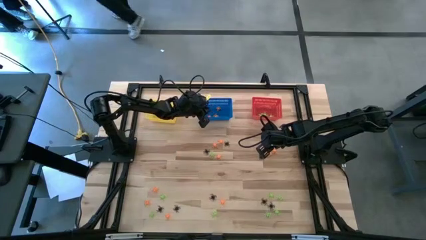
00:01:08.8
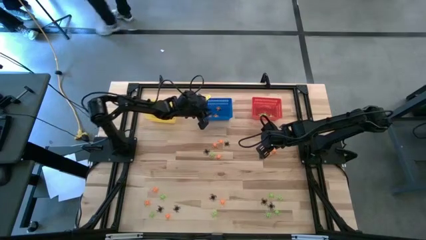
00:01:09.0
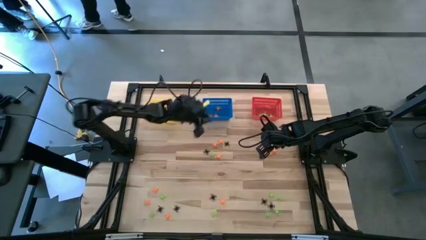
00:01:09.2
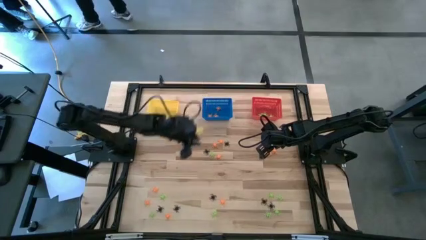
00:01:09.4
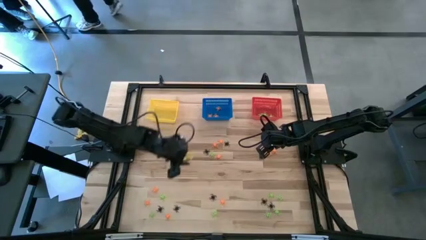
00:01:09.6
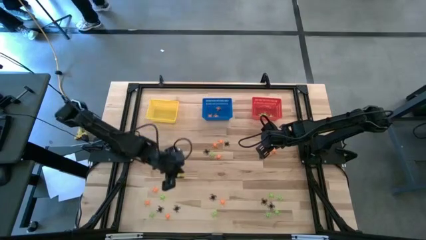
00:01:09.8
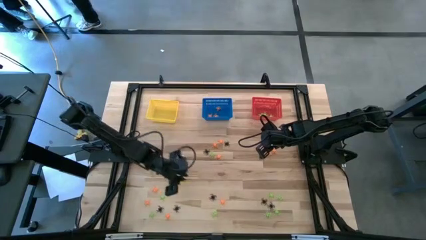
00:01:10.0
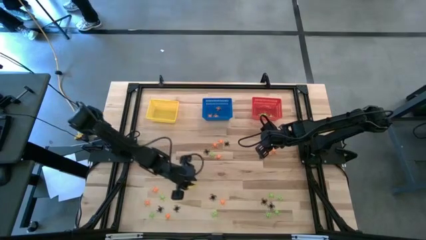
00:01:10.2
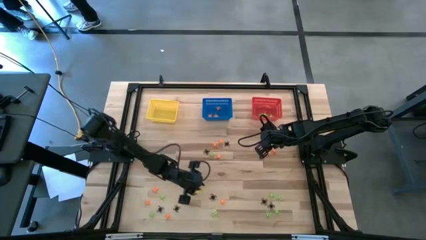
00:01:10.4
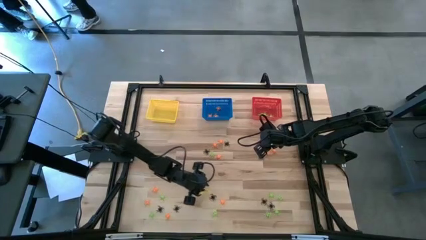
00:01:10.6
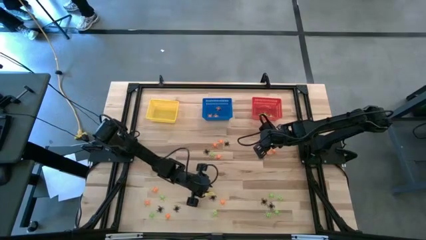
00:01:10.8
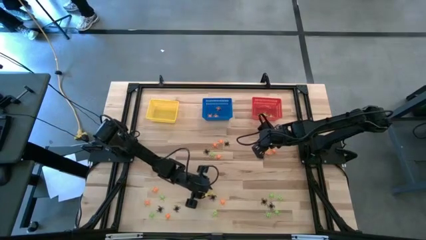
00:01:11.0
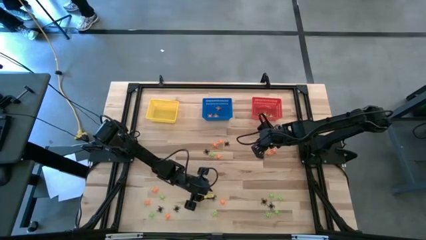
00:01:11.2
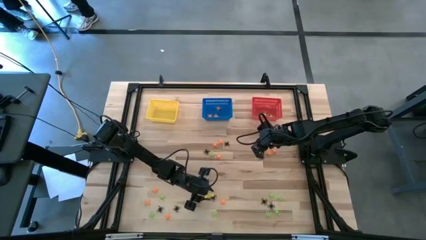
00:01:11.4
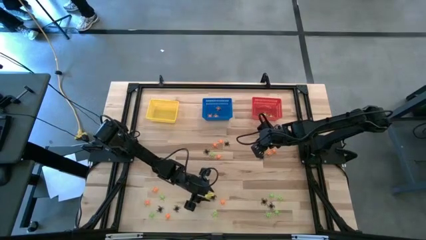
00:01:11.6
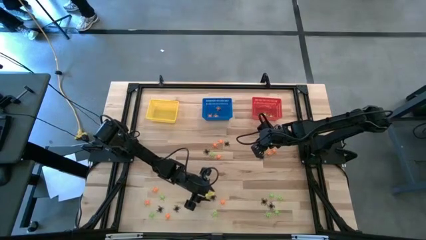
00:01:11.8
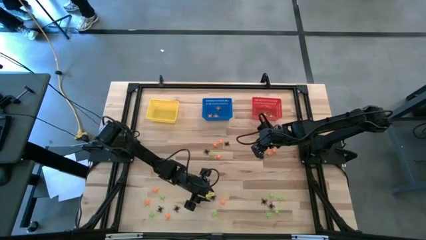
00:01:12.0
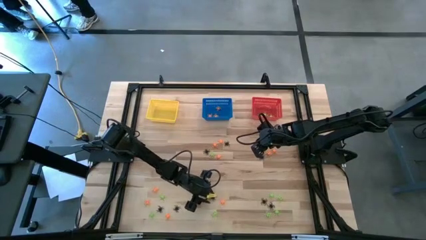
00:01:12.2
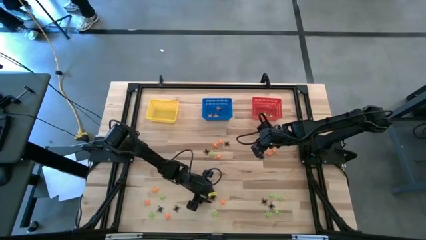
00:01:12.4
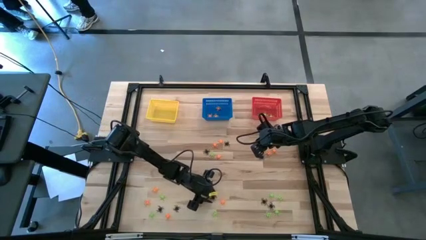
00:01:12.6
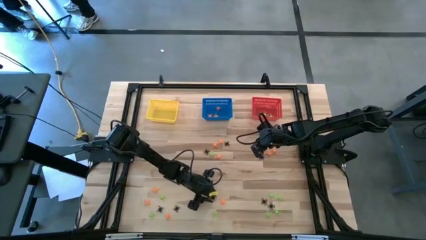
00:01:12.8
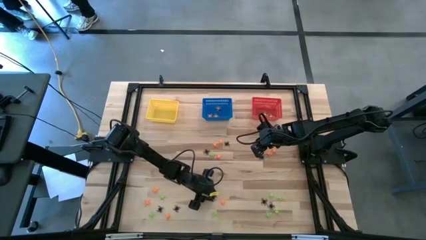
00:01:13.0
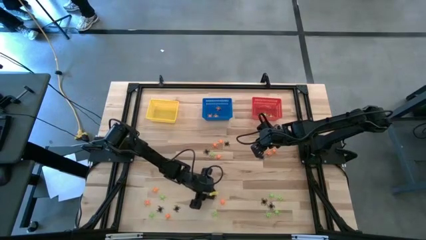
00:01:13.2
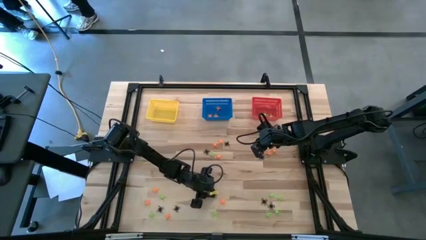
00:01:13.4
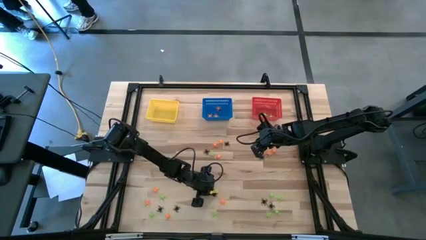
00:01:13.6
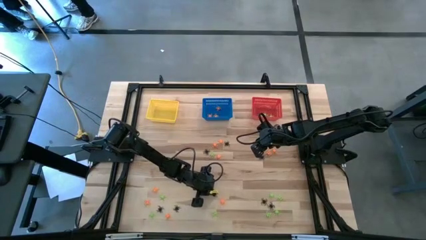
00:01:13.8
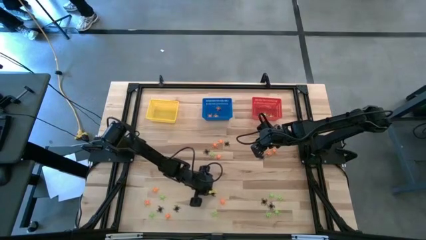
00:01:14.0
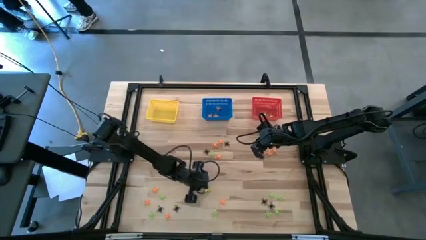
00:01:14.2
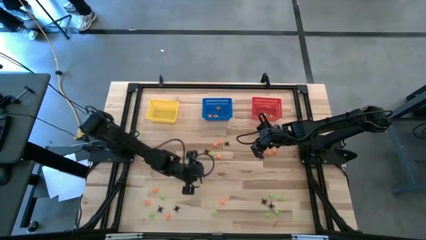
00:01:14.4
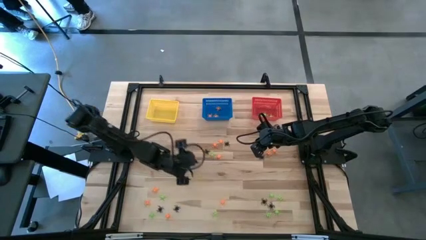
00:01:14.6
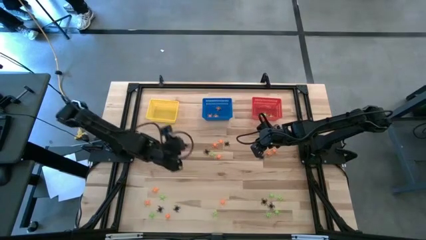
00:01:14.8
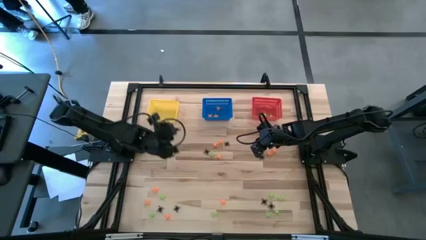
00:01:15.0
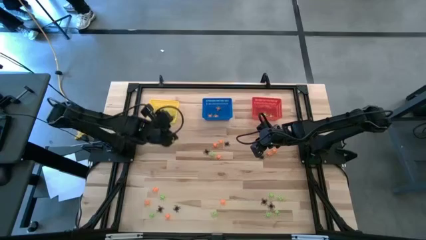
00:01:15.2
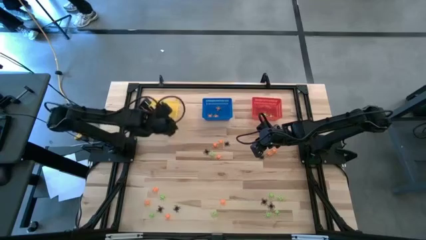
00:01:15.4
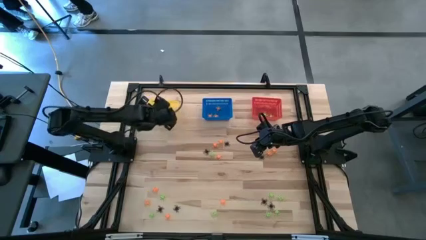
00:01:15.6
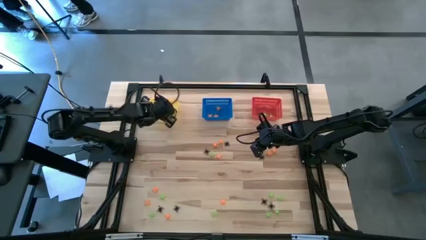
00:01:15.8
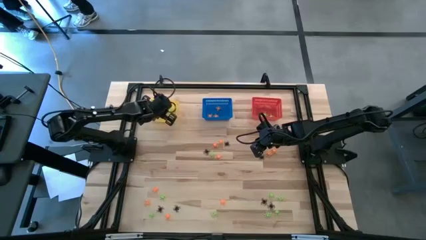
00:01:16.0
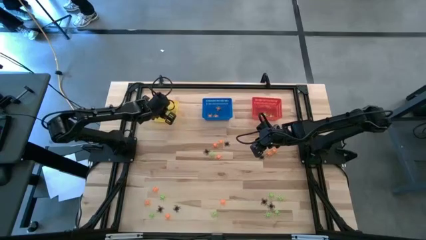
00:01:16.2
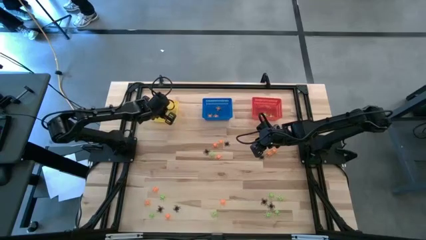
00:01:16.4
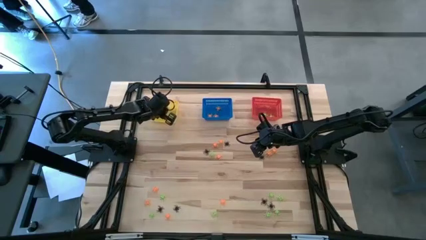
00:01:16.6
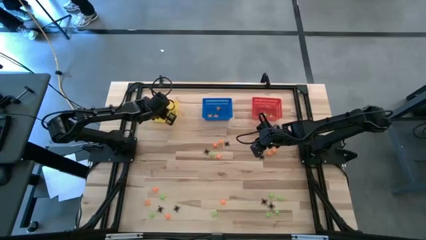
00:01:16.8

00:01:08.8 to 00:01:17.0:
Task: Sort Halloween decoration
Put the black spider toy into the yellow basket

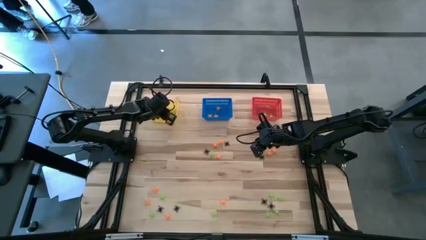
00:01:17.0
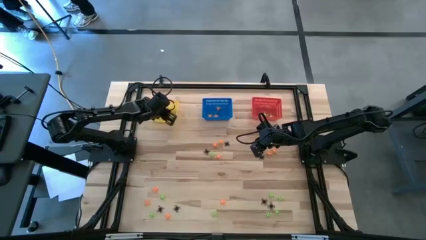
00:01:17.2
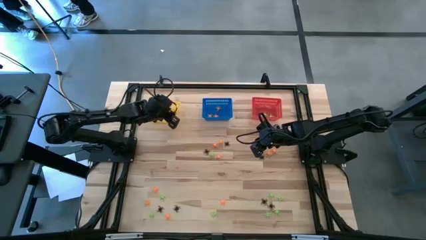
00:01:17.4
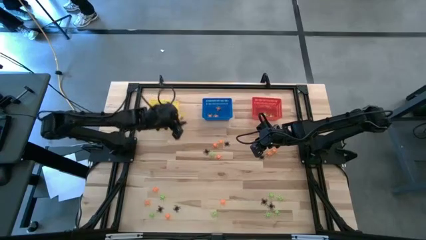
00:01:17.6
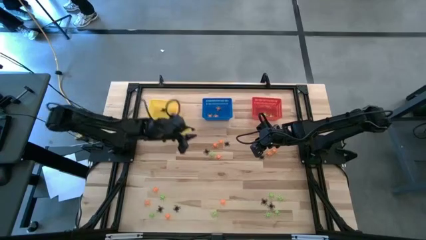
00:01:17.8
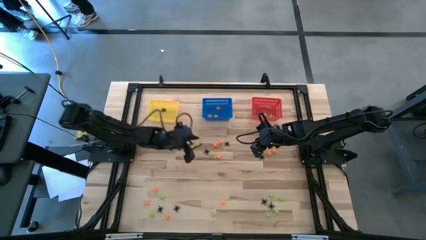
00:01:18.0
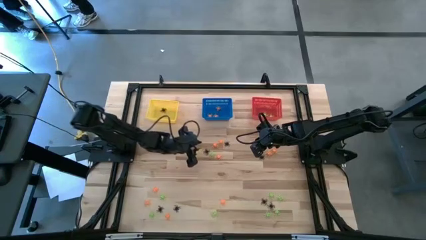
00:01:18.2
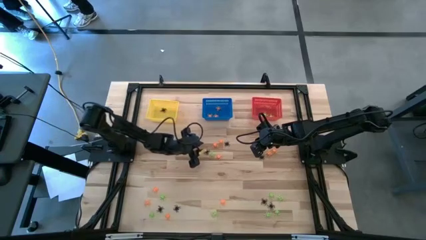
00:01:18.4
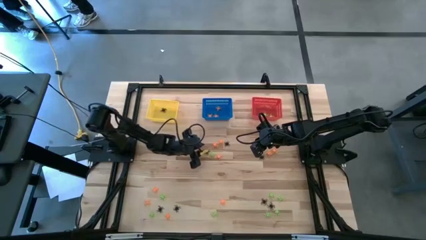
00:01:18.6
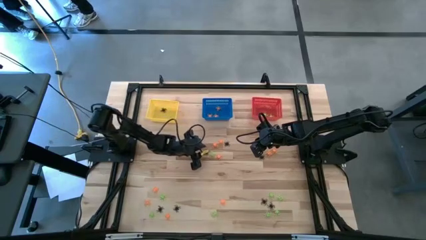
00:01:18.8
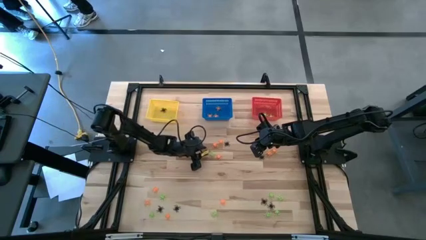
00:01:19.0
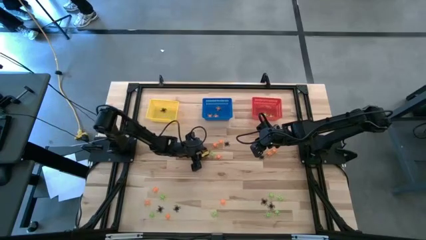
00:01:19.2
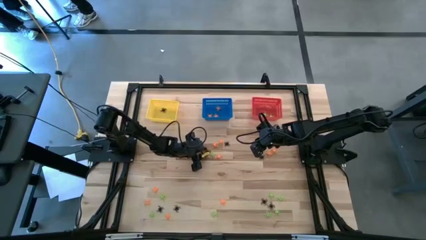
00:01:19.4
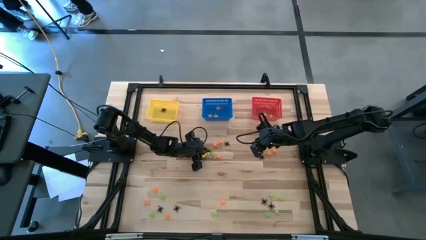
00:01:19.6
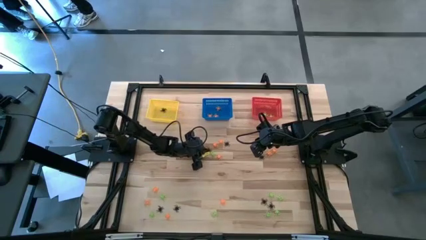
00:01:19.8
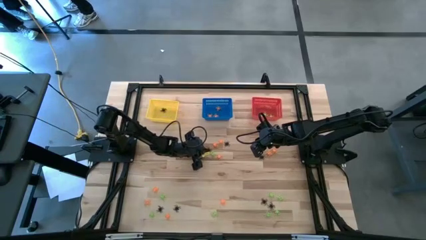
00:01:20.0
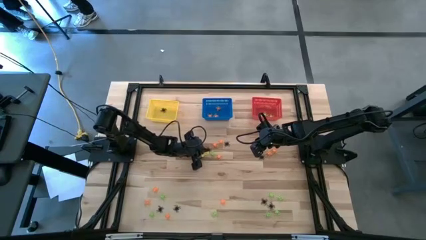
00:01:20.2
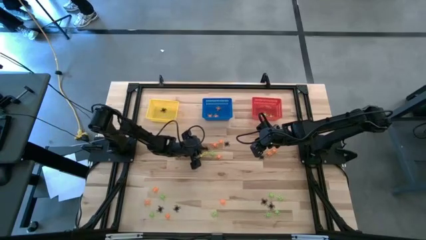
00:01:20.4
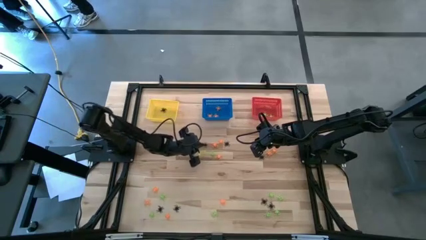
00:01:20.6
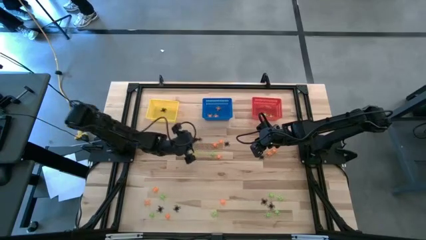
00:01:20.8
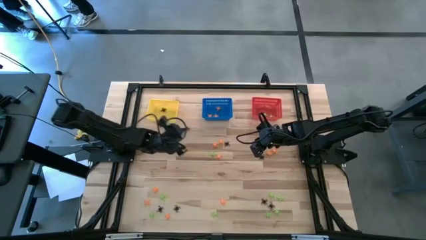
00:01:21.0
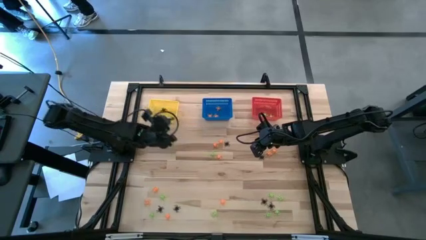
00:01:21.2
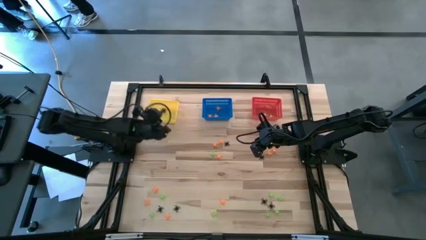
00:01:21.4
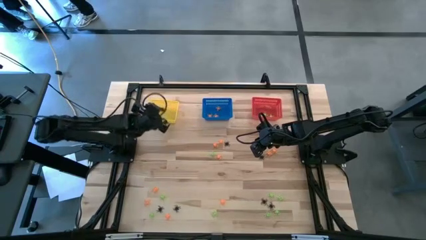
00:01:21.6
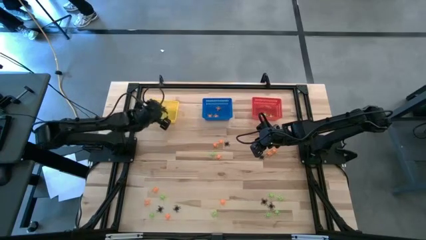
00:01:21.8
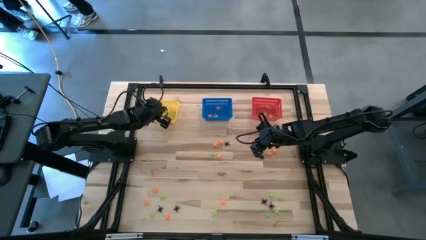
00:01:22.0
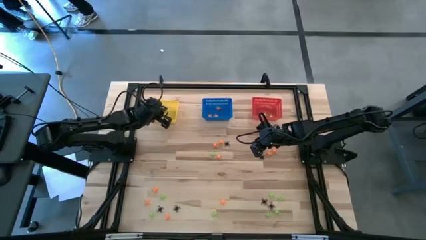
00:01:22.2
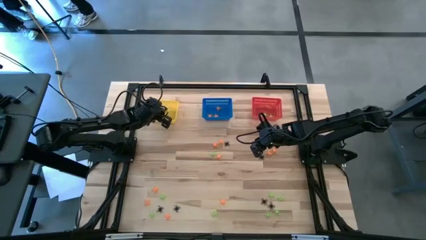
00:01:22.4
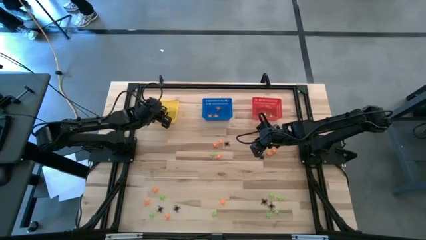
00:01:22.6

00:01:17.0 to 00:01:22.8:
Put the black spider toy into the yellow basket

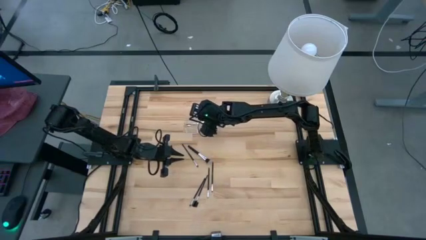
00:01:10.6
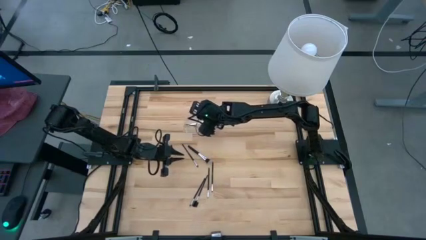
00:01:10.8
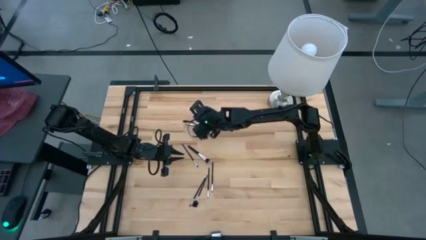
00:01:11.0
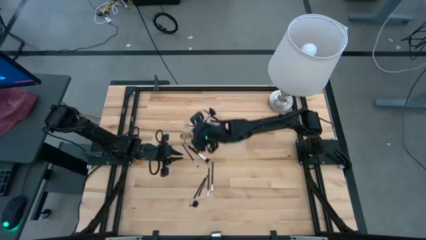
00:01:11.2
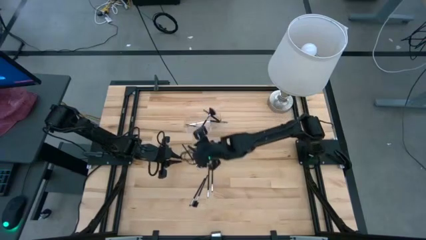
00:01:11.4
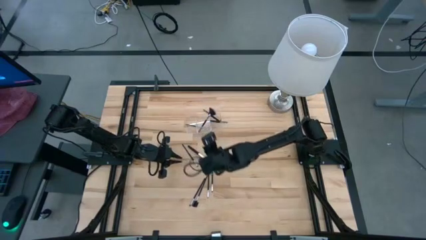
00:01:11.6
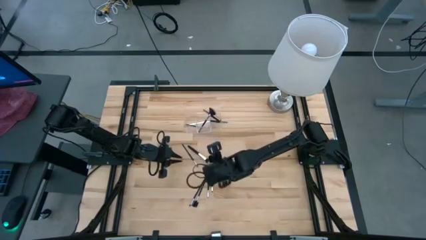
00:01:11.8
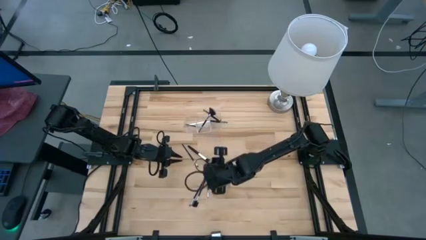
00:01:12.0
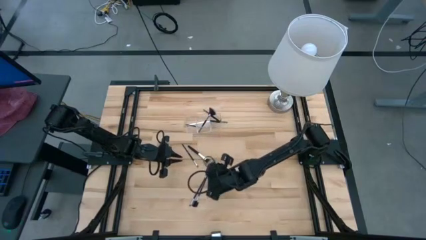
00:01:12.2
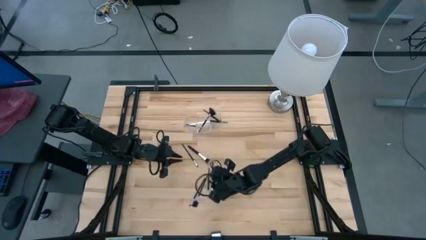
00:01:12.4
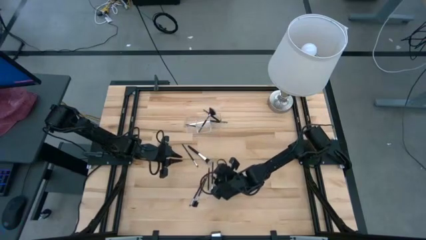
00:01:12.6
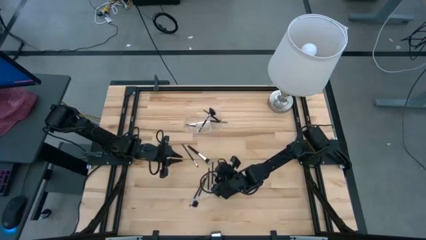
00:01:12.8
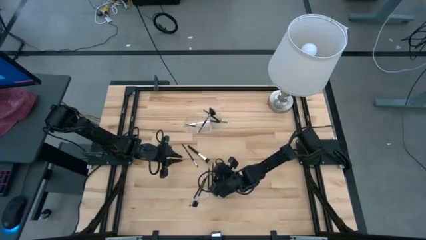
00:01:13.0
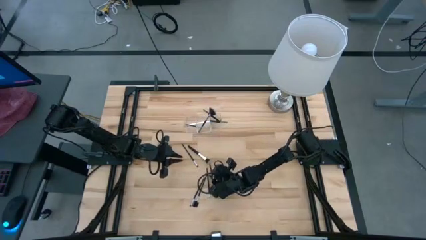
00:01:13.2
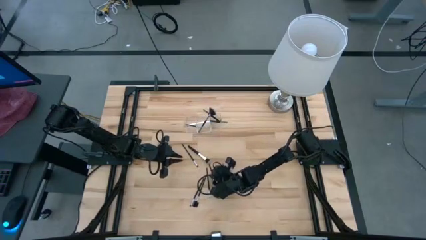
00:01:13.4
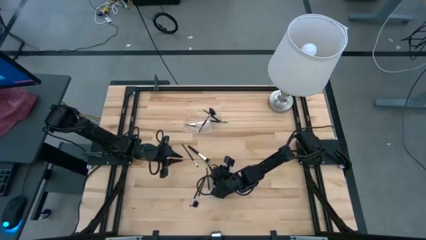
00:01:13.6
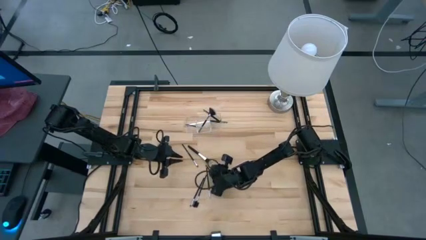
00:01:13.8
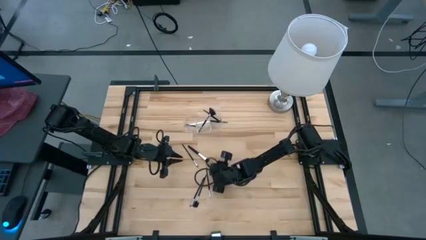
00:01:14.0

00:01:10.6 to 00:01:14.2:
Task: Put items in baskets/containers
Put the black eyeshadow brush into the transparent organizer
